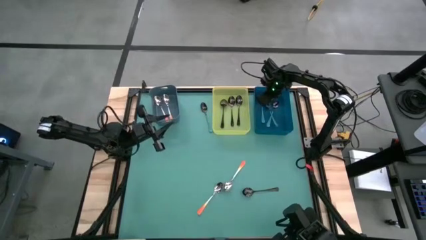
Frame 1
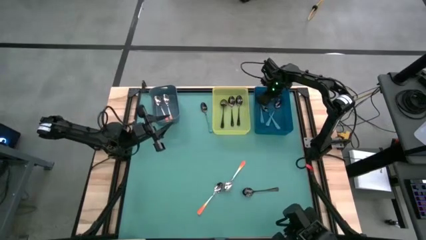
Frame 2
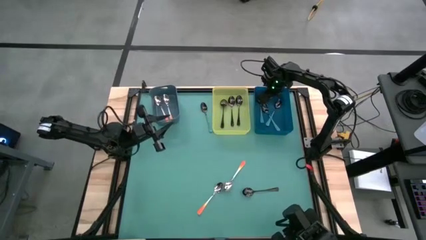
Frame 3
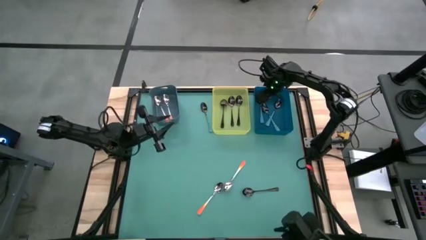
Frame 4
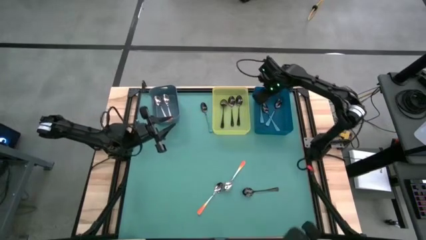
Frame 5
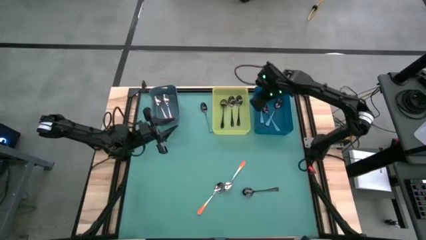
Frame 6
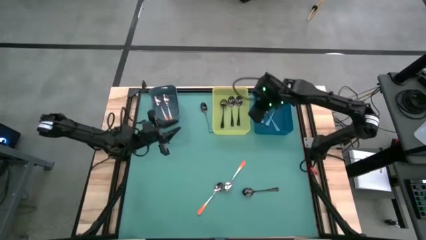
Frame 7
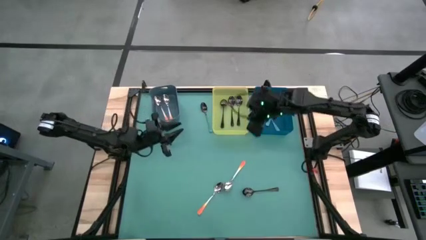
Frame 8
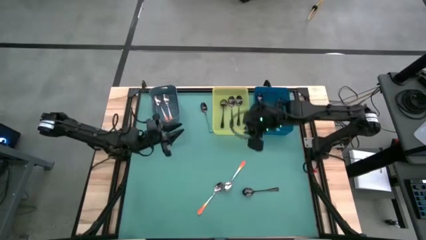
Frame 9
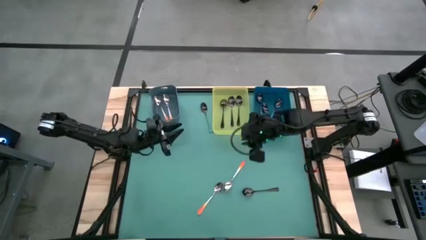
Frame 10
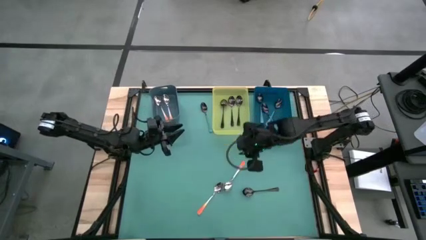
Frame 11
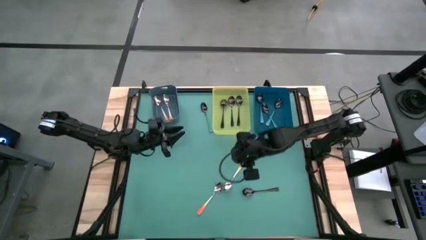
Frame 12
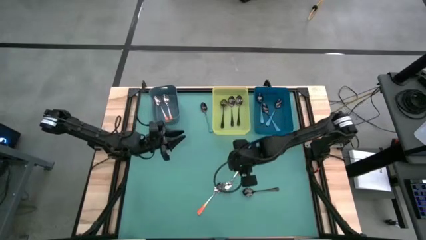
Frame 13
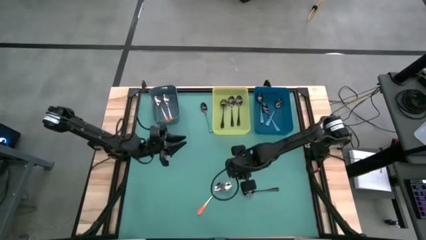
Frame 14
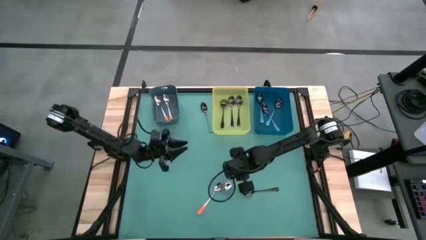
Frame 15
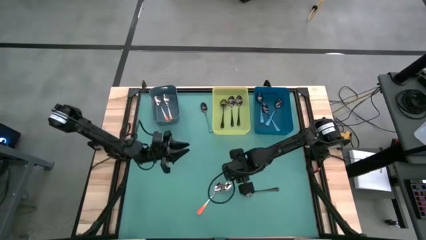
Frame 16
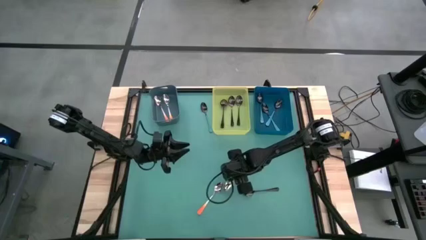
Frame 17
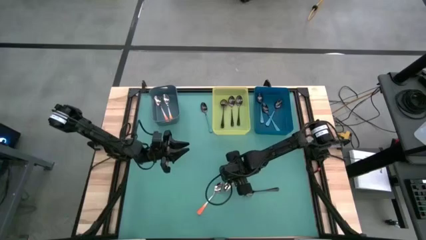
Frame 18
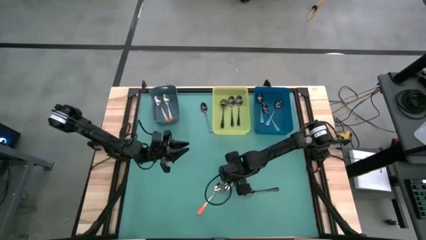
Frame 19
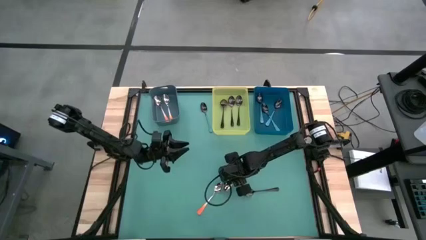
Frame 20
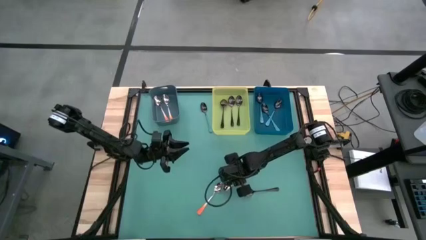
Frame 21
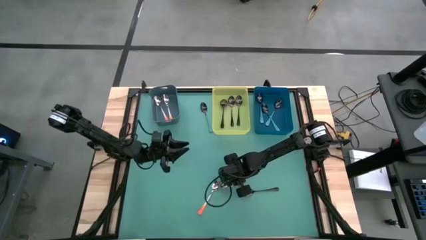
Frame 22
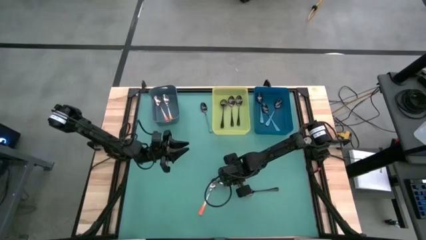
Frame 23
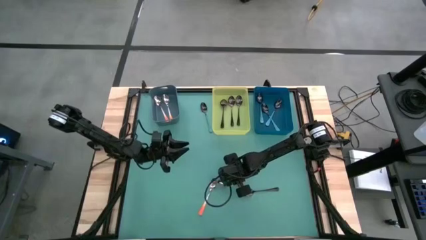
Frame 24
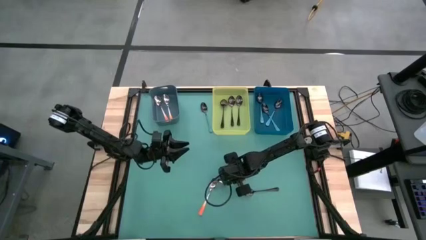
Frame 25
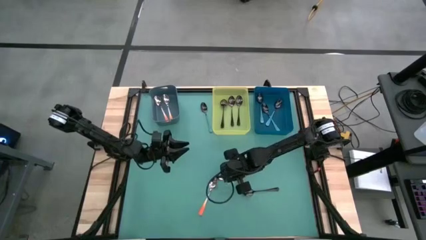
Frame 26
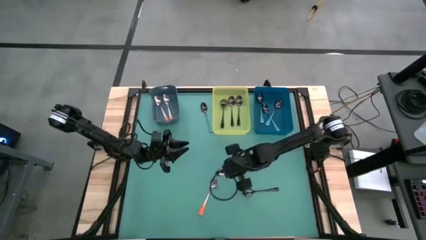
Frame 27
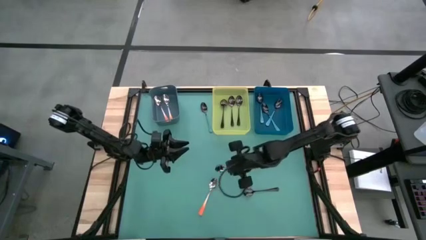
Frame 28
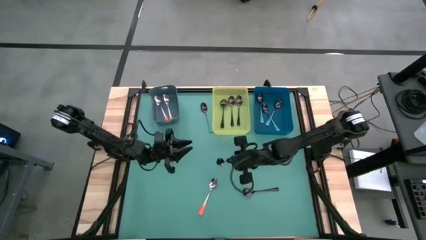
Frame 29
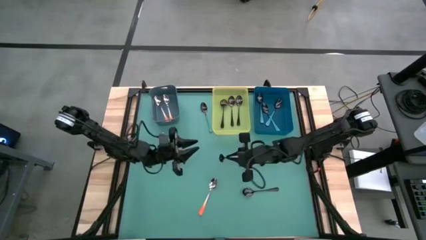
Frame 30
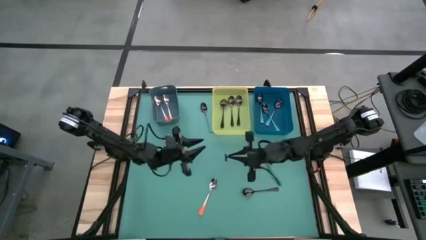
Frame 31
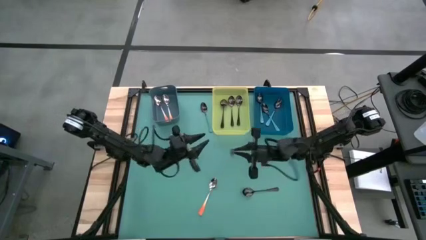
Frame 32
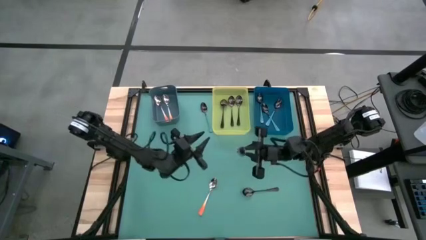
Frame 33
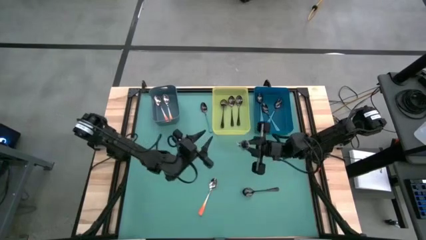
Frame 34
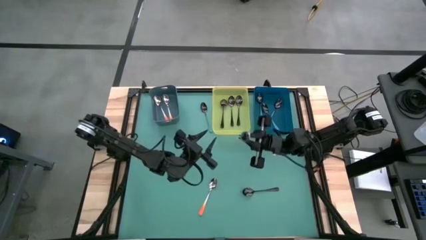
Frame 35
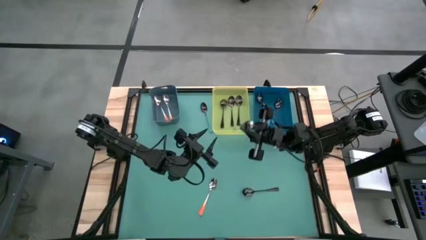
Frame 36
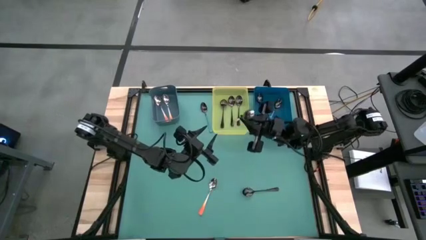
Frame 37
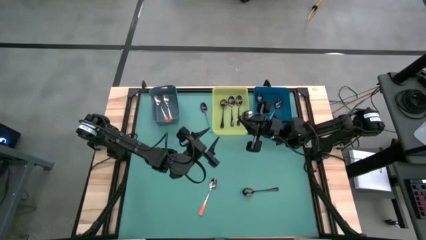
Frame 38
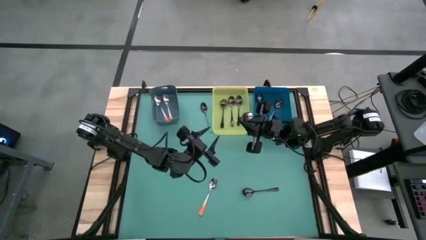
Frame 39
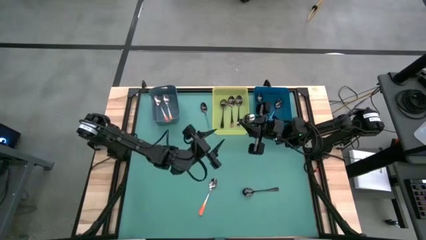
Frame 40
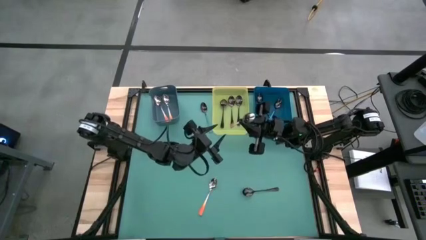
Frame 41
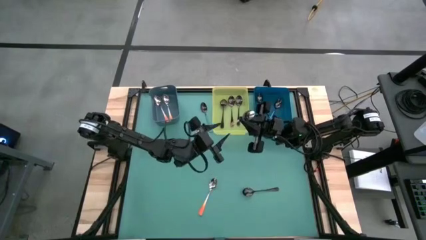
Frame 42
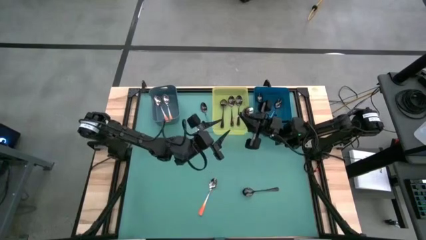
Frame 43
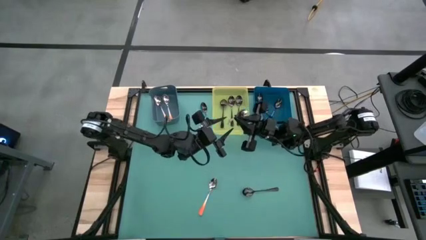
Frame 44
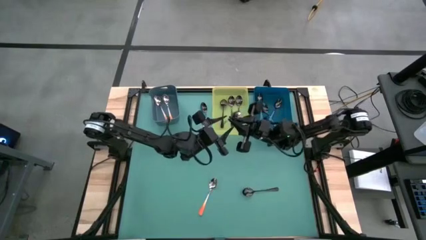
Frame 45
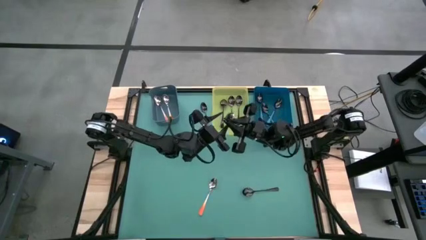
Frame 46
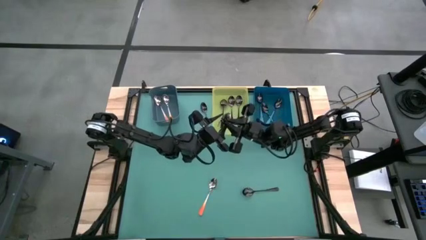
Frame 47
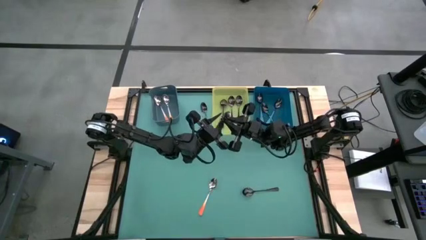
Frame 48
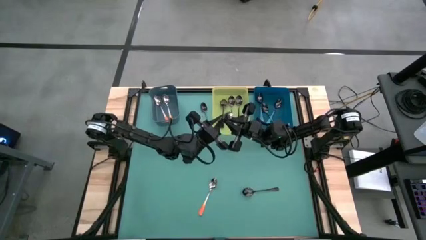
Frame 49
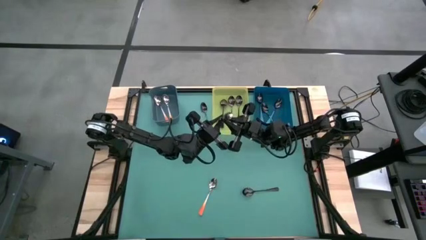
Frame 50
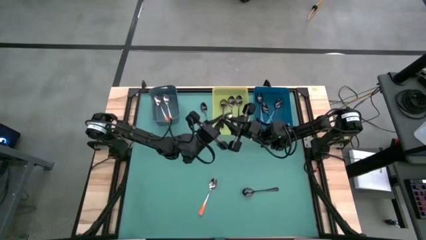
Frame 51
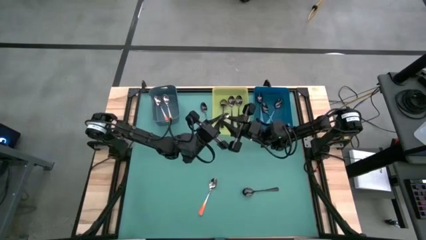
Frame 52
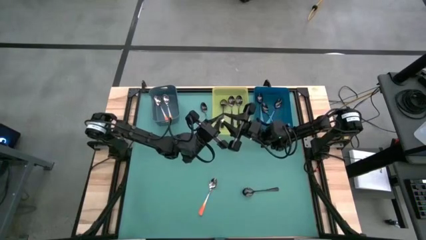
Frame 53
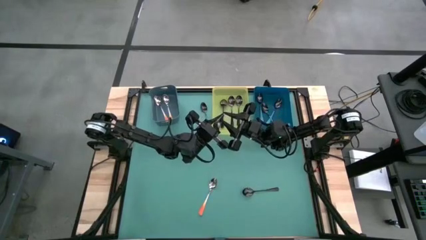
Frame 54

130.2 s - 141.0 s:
Task: Sort silverware by color (type)
Put the orange spoon into the green bin

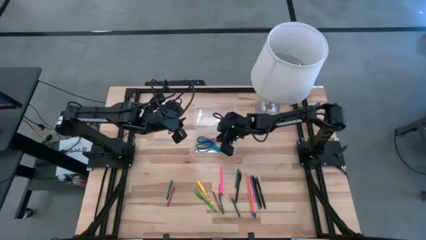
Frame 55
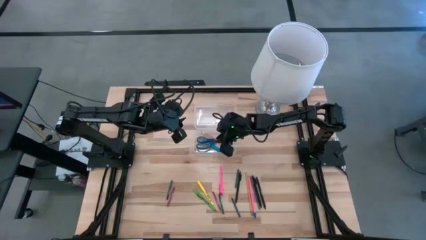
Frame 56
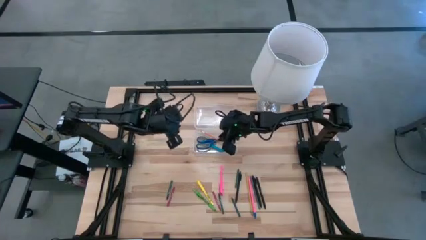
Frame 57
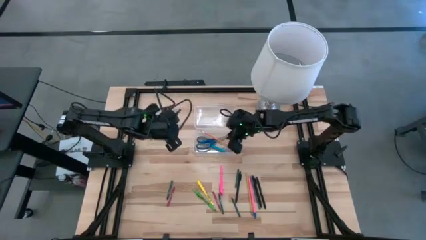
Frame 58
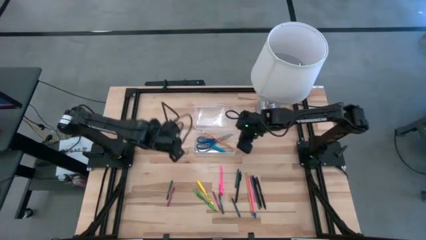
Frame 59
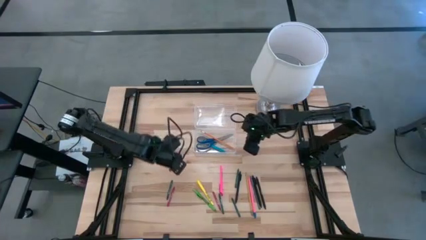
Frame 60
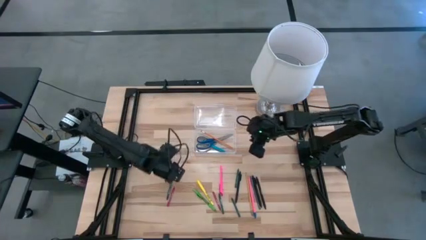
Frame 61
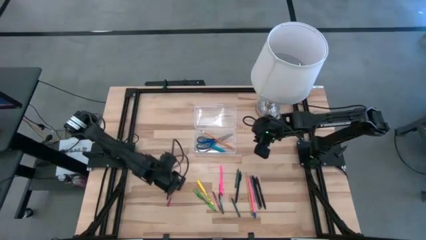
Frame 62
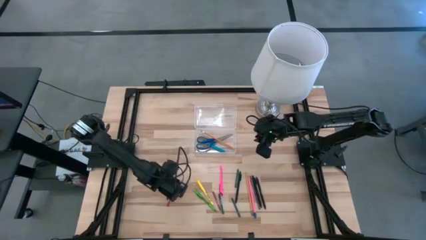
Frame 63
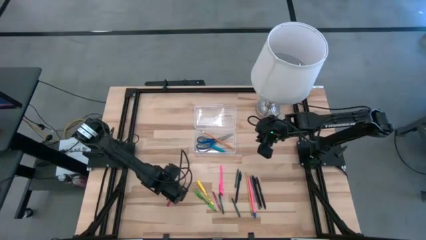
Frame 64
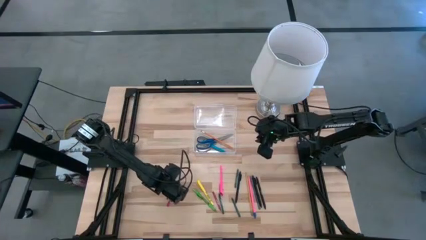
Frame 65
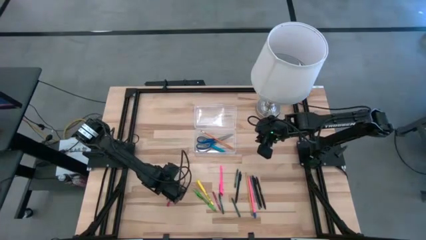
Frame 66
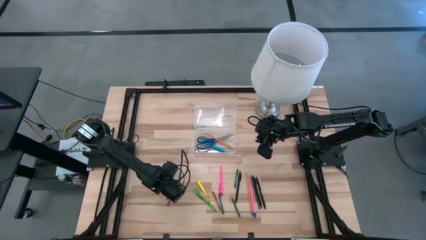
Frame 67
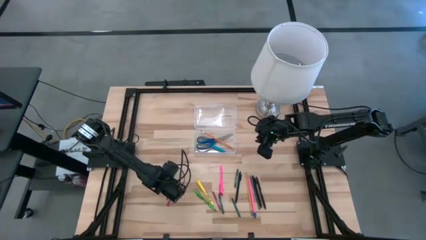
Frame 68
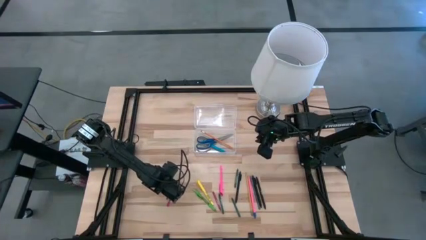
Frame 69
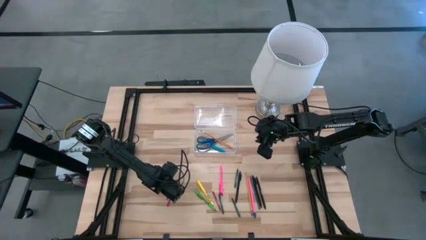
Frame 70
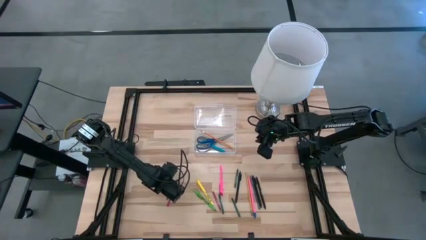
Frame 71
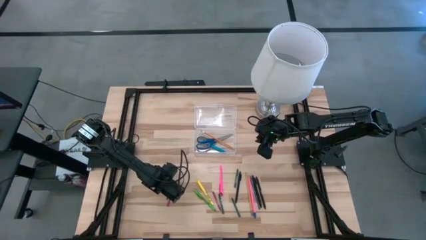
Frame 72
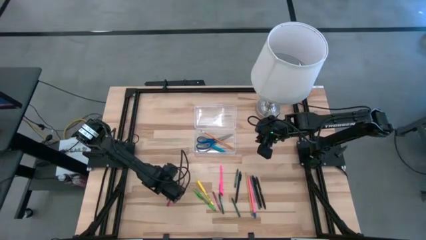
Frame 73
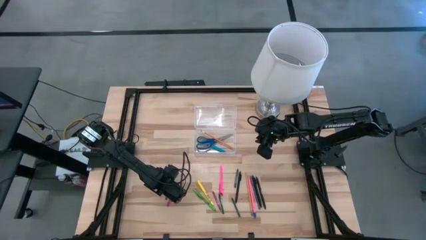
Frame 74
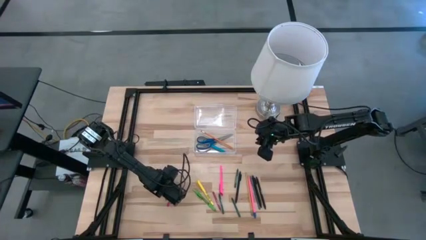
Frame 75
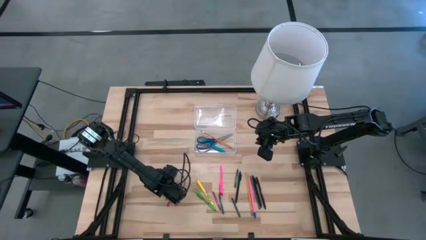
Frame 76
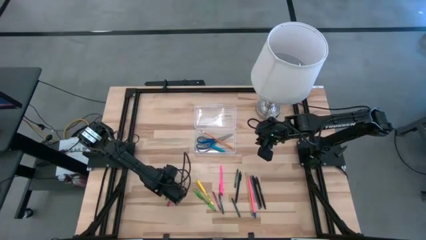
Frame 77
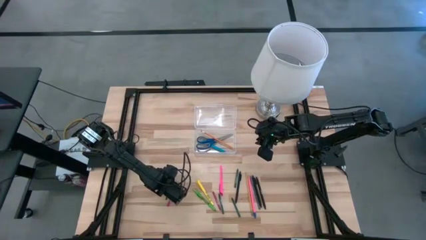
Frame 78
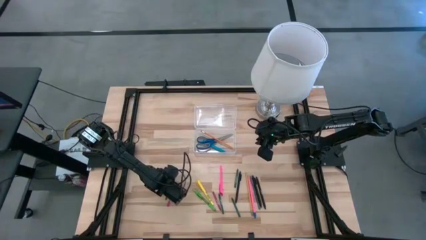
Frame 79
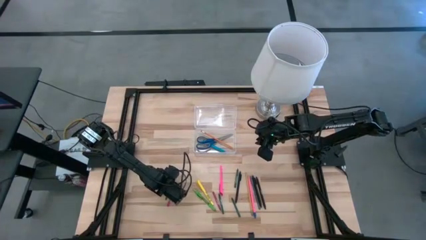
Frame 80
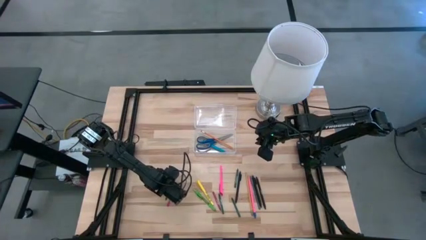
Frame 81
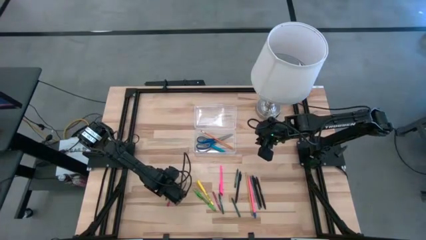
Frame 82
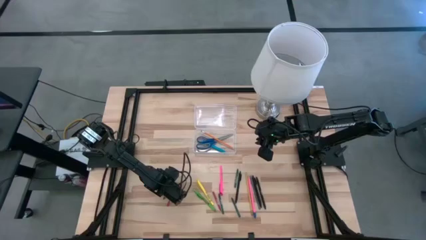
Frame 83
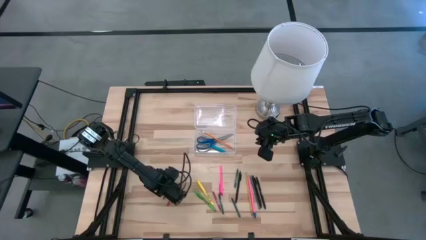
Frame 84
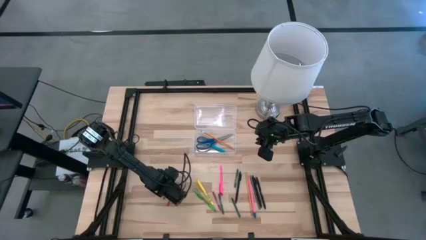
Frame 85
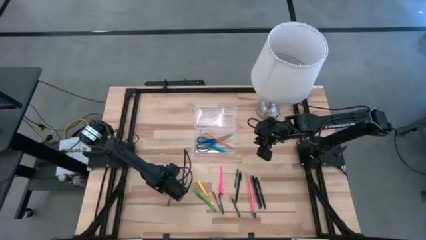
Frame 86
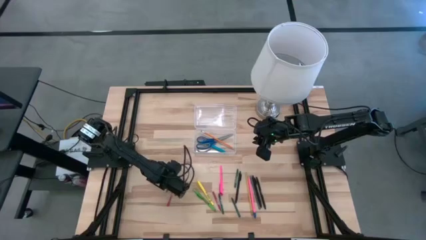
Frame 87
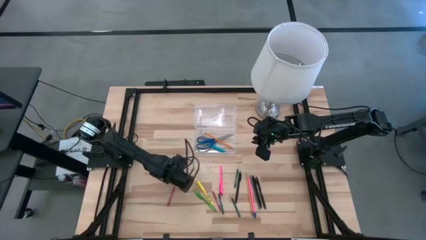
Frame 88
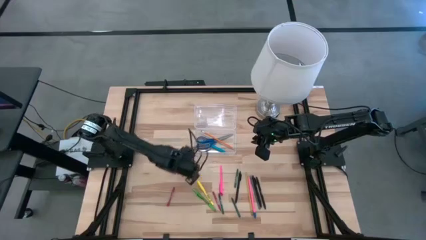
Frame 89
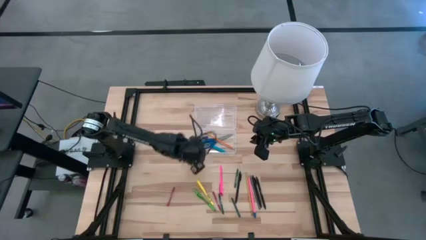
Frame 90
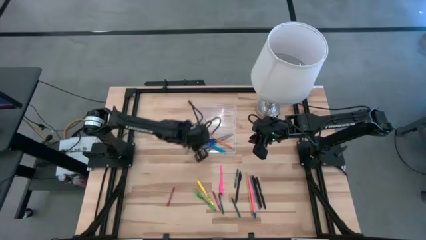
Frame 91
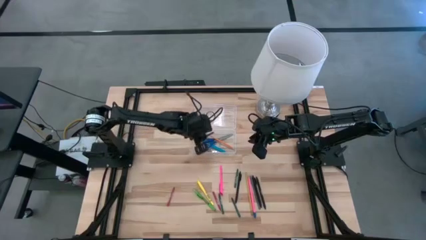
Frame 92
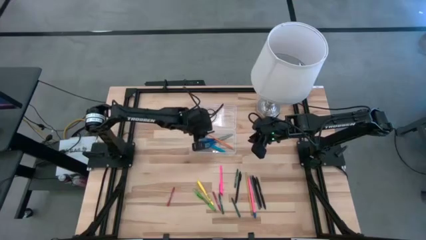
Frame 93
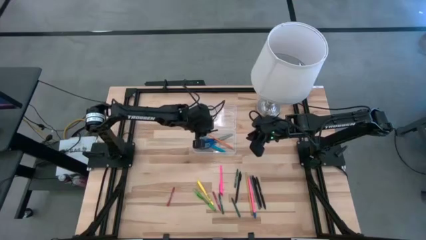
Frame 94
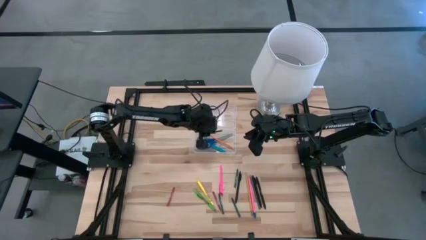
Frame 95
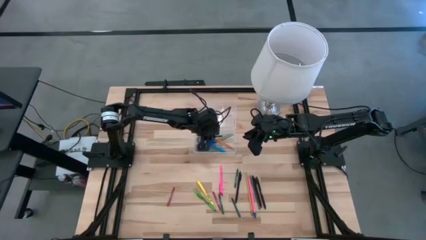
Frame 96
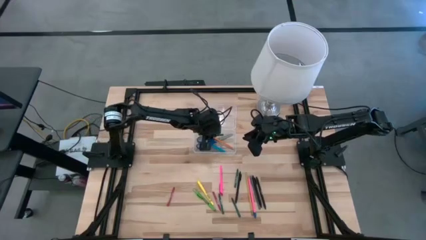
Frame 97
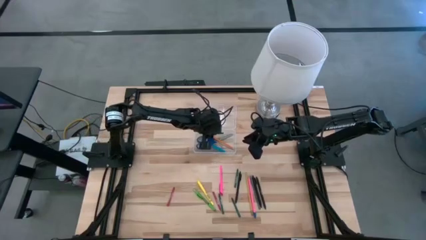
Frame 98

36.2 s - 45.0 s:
Task: Pick & place school supplies into a supply box
Put the green crayon into the transparent supply box
